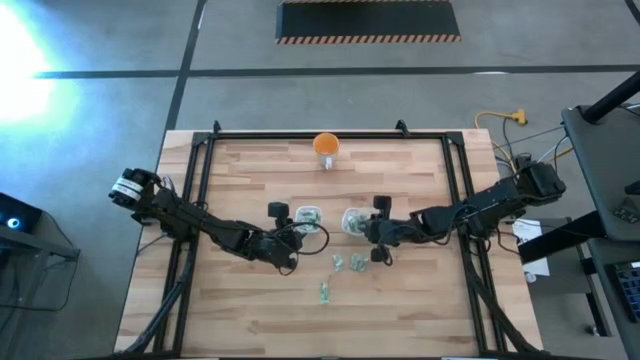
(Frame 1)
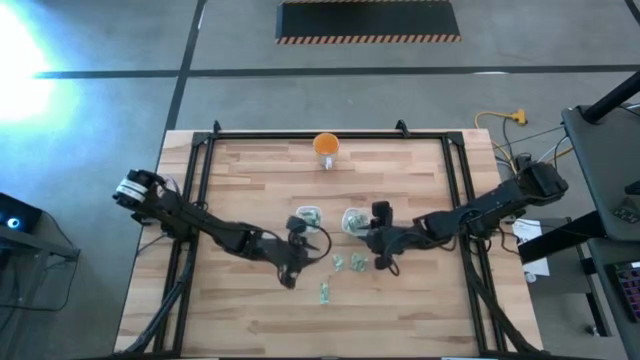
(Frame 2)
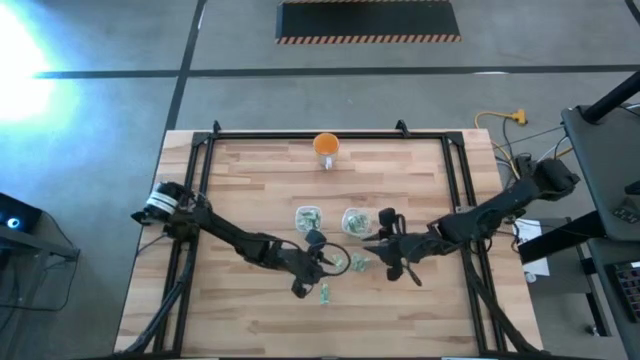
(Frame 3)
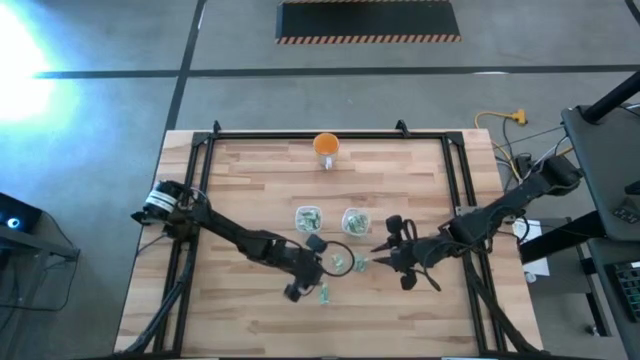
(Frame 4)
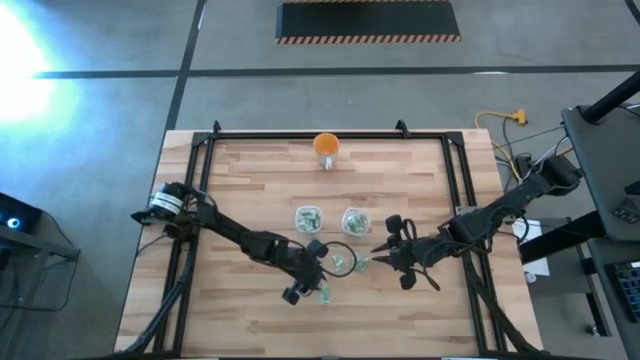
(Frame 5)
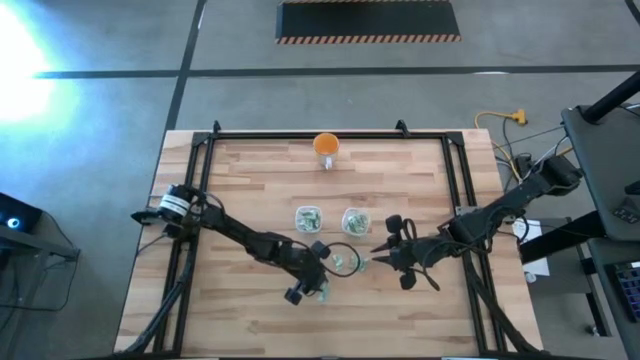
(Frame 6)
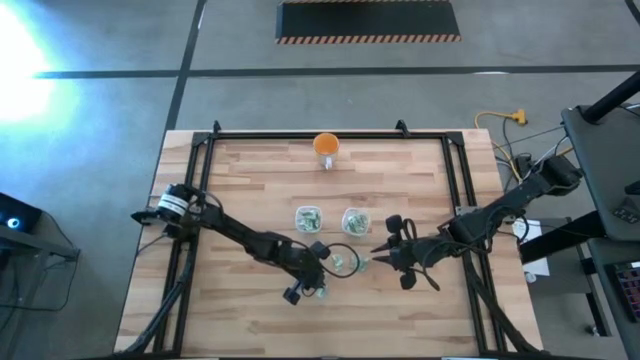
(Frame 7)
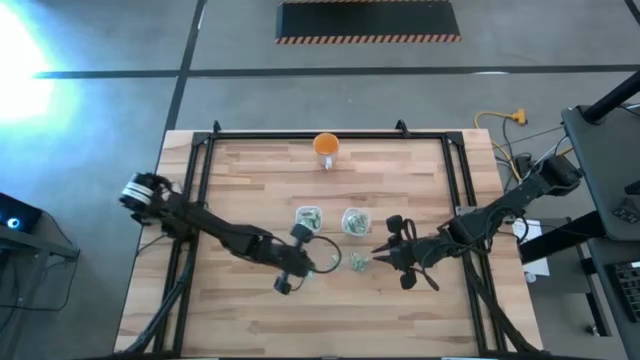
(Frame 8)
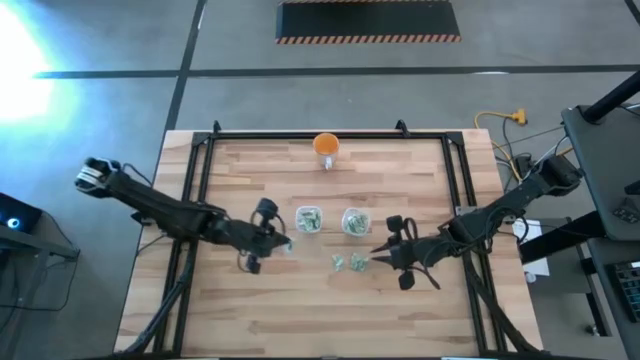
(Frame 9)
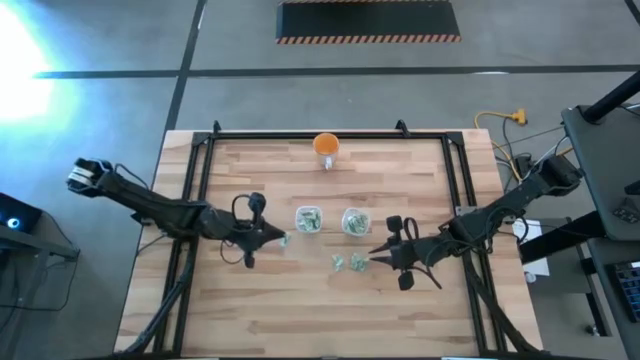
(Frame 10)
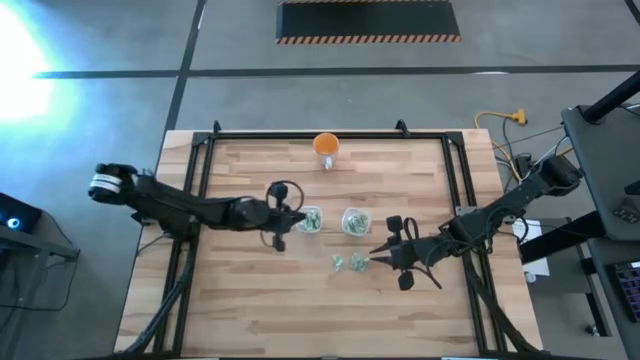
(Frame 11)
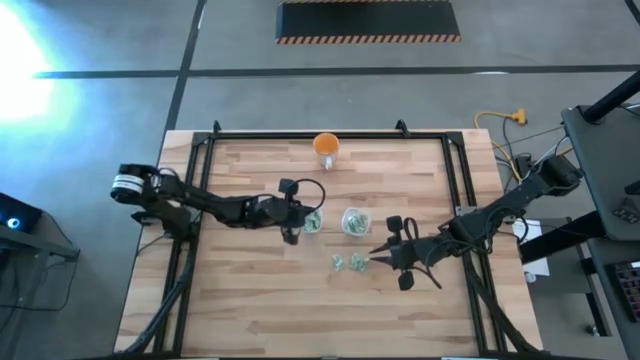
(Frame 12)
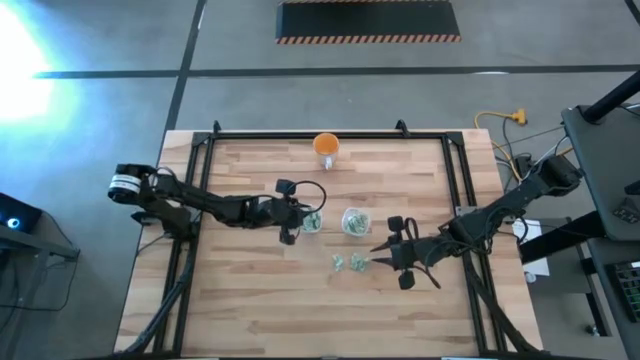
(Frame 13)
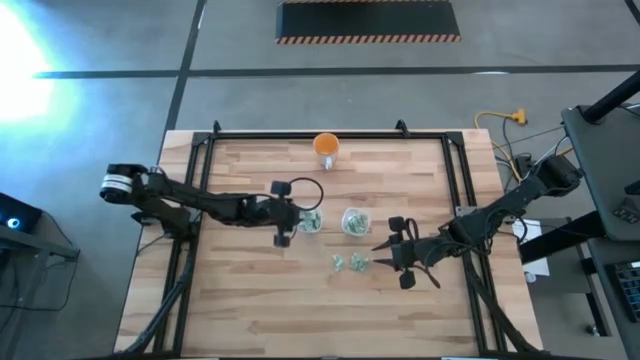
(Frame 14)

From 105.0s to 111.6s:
Task: Pick and place Stevia / Truvia into bins
Put the green stevia packet into the left transparent container

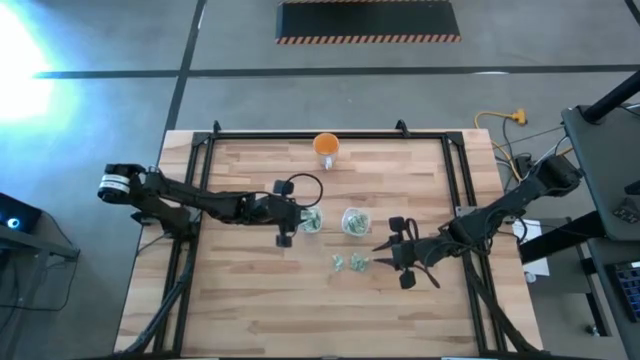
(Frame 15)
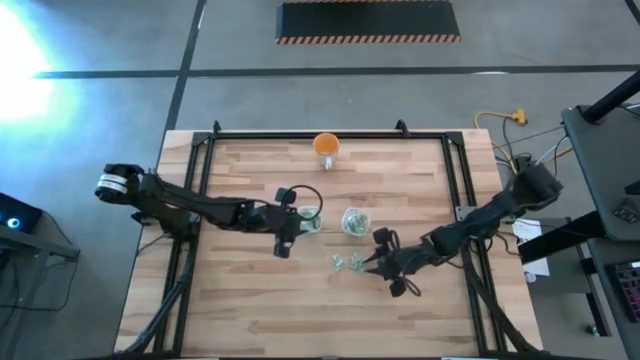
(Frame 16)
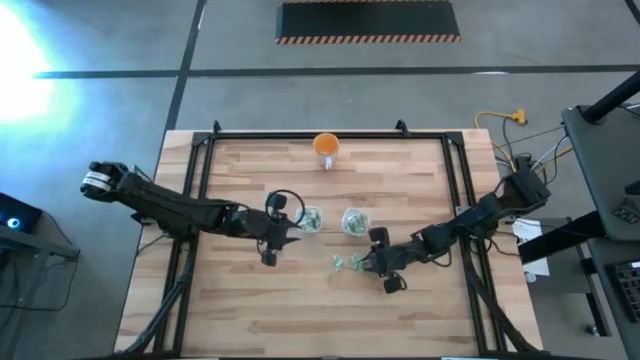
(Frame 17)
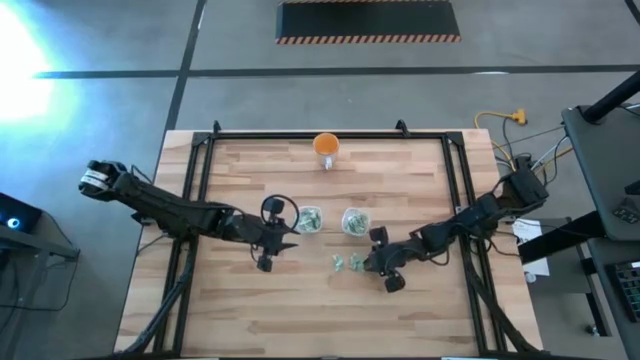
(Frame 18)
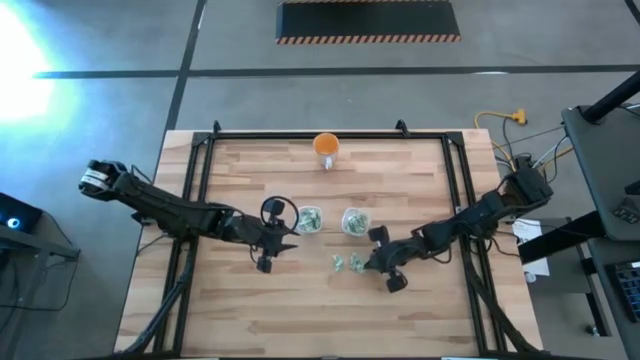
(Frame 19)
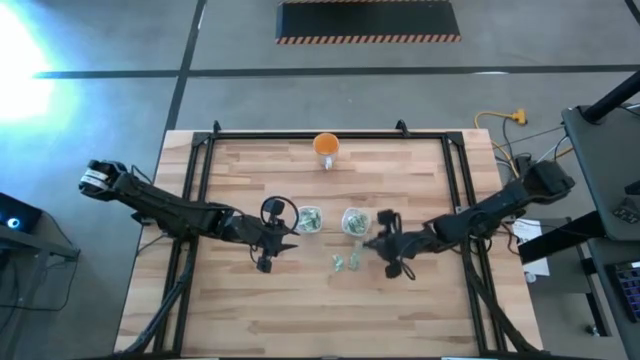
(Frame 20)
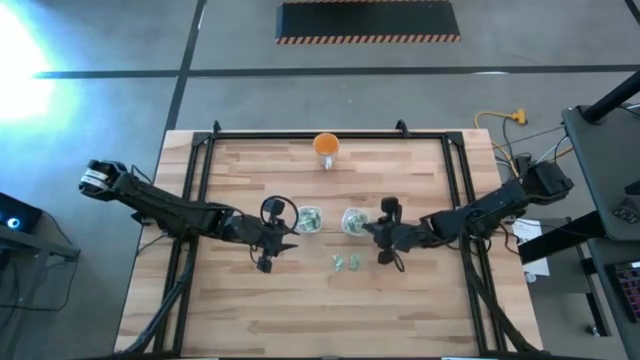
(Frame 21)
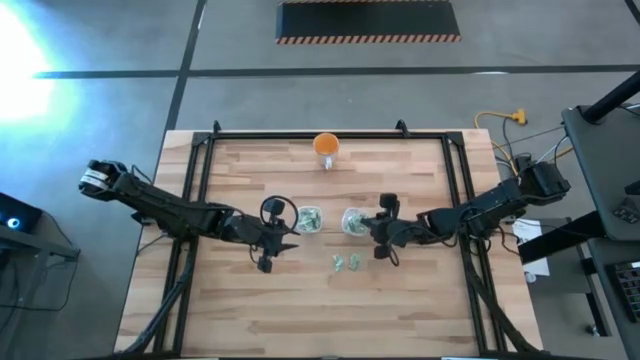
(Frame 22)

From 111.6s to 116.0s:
Put the green stevia packet into the right transparent container

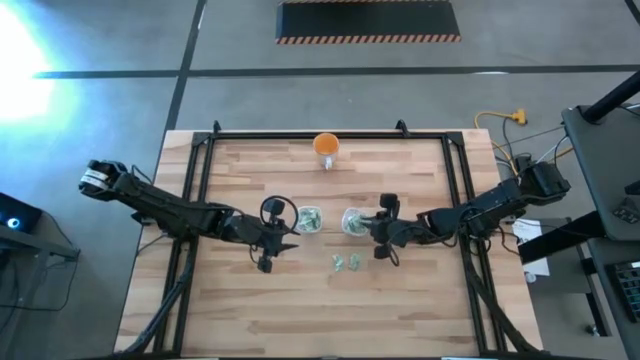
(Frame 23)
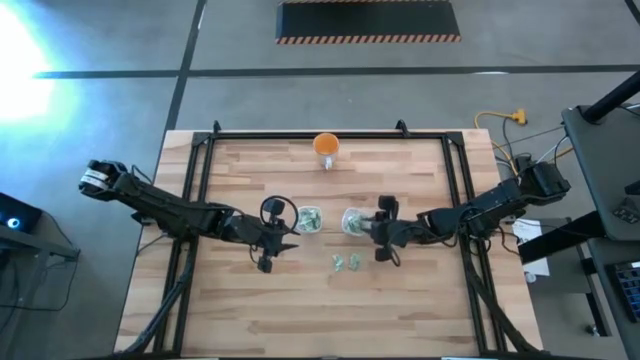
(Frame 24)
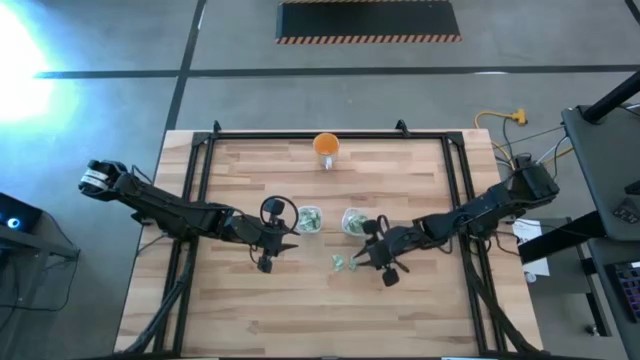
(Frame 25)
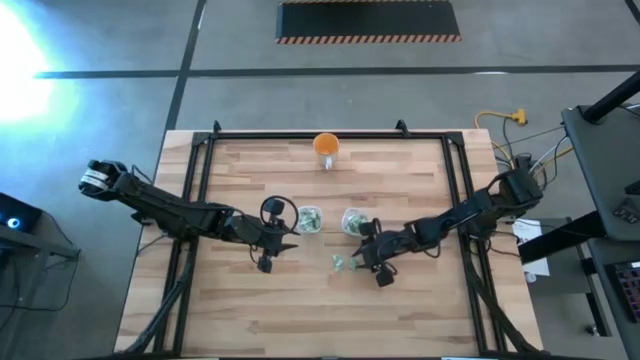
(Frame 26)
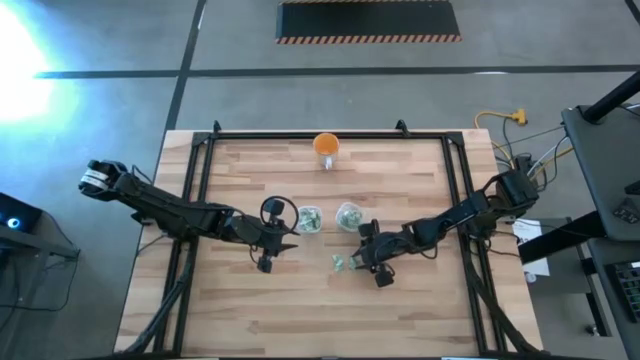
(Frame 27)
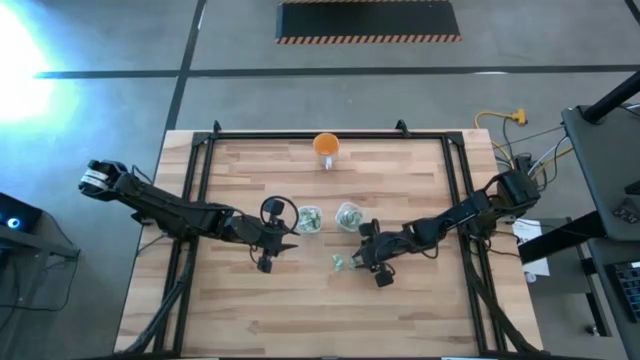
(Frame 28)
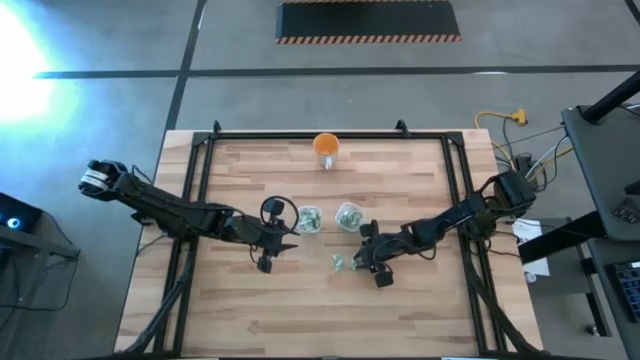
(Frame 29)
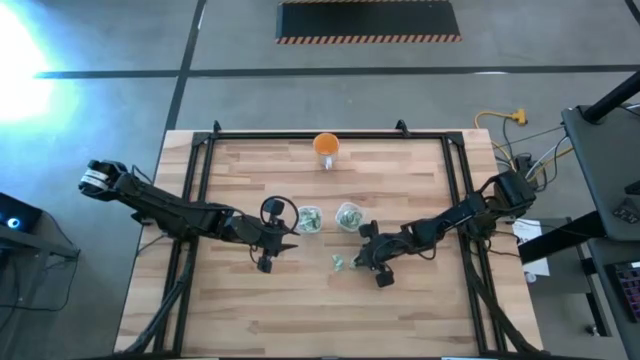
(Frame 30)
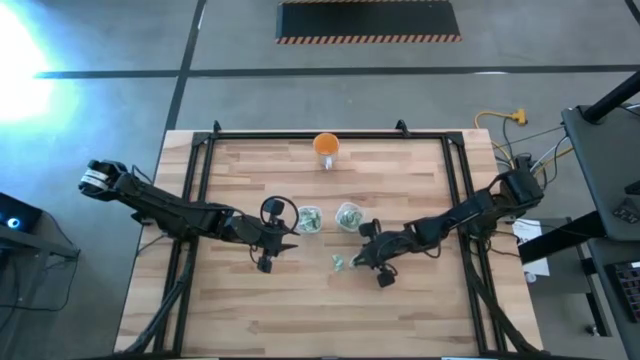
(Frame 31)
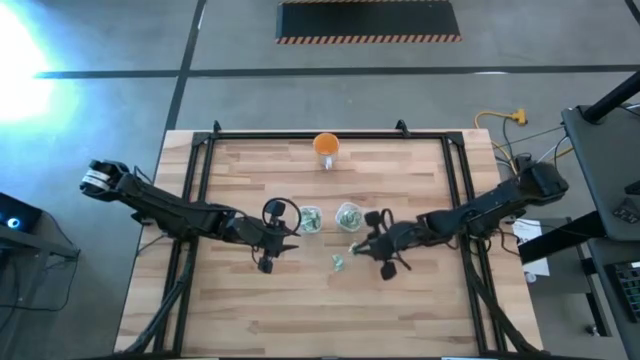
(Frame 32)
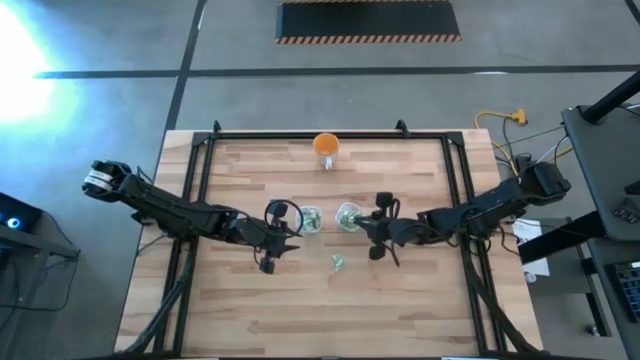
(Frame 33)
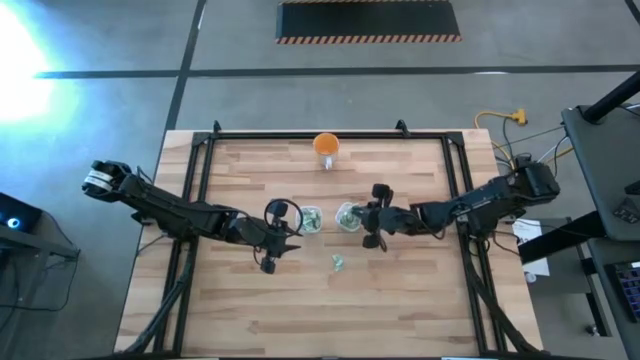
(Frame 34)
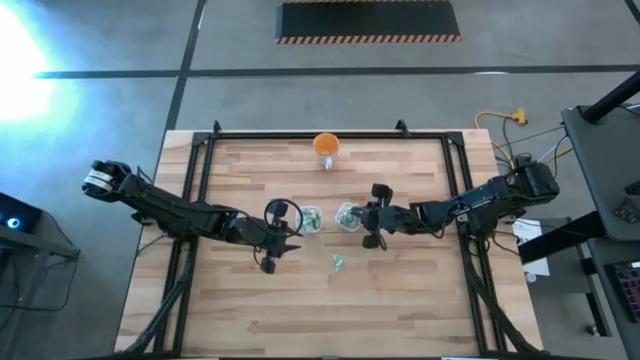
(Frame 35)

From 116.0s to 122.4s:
Put the green stevia packet into the right transparent container

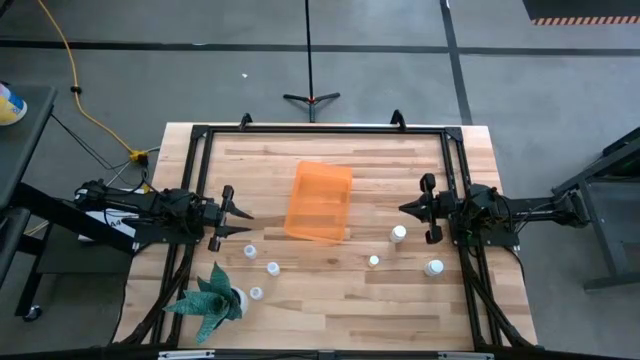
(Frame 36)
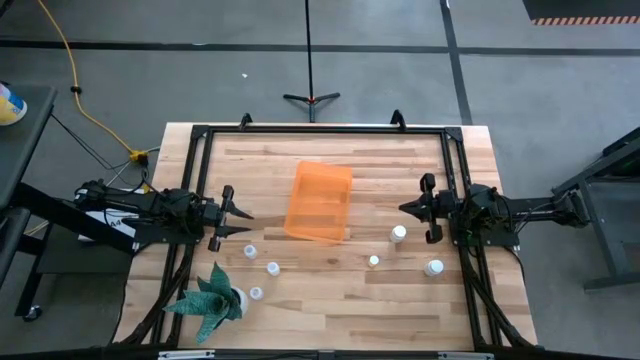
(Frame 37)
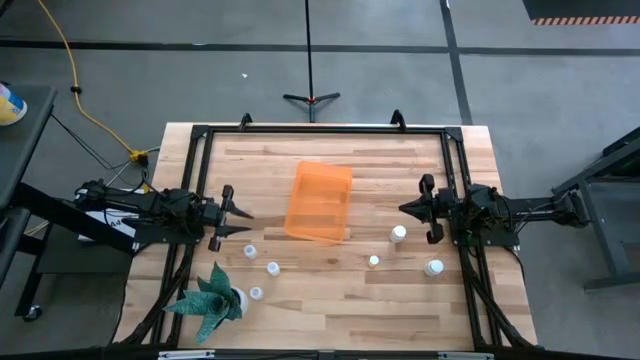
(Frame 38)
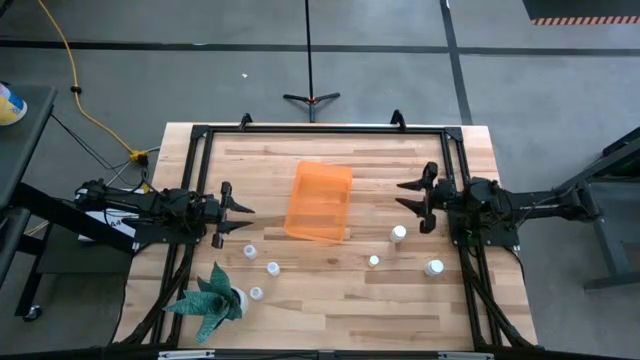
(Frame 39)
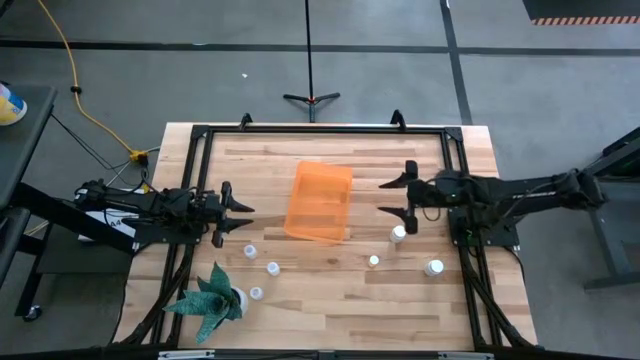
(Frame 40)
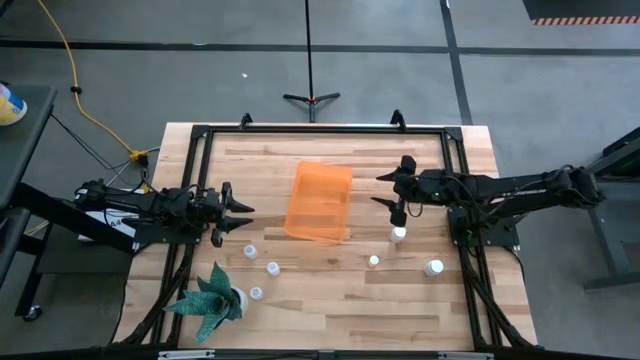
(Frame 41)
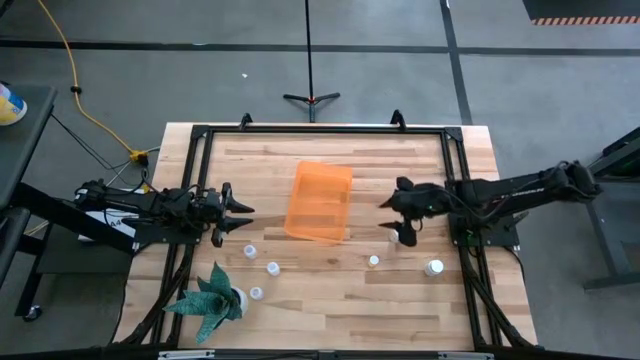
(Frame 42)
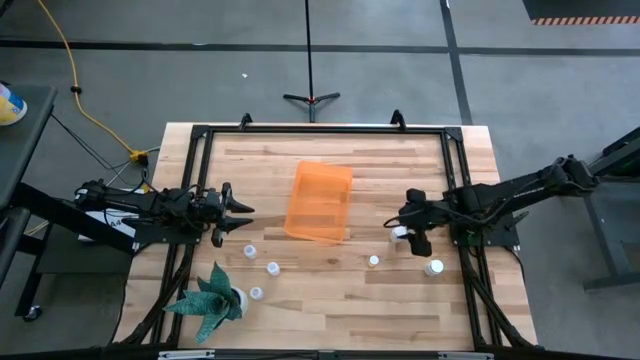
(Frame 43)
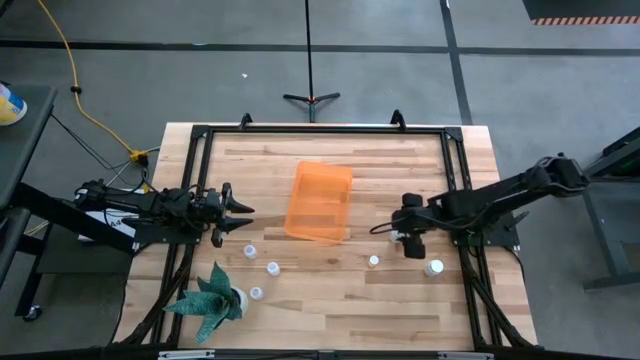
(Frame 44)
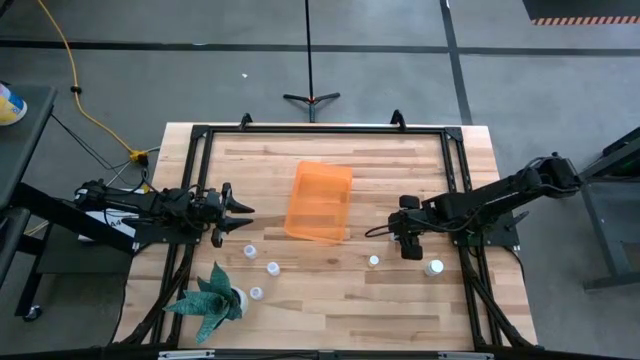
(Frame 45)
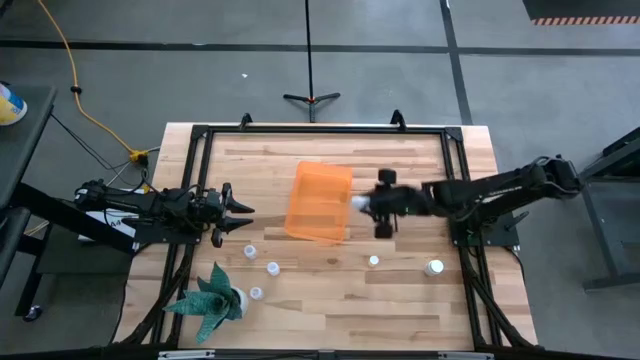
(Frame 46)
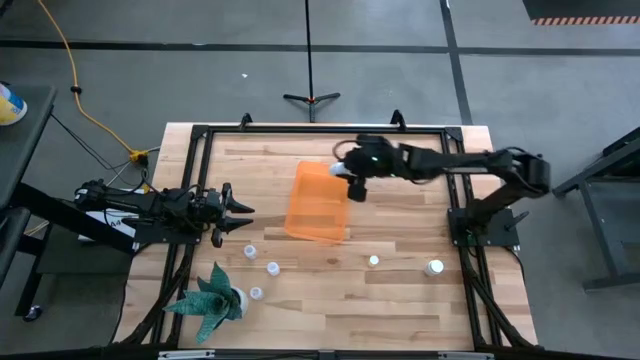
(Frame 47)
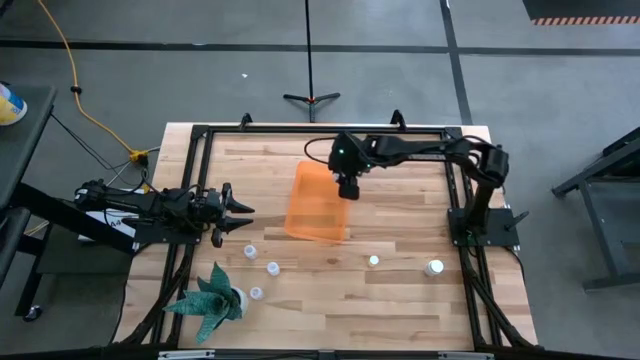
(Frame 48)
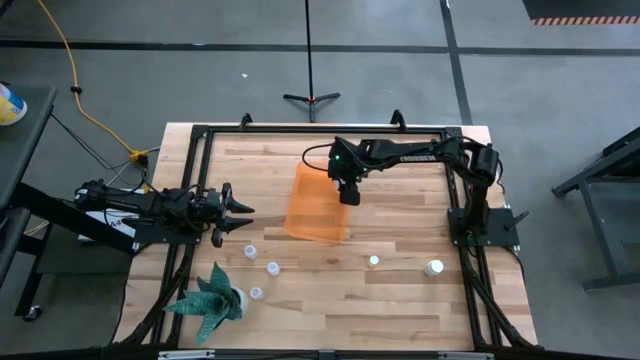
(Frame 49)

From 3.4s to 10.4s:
Task: Pick and place pill bottles into a basket
Put the left white pill bottle into the orange bin
